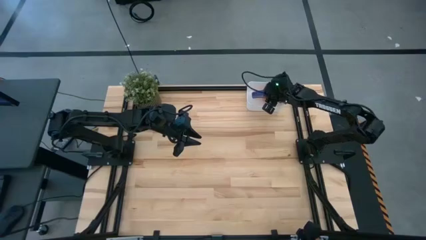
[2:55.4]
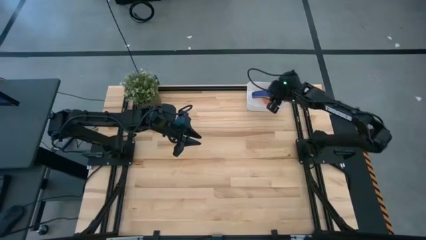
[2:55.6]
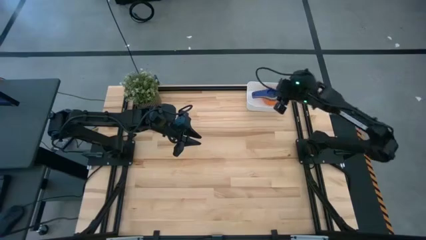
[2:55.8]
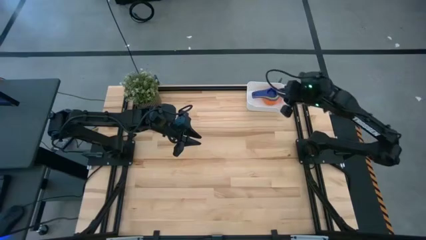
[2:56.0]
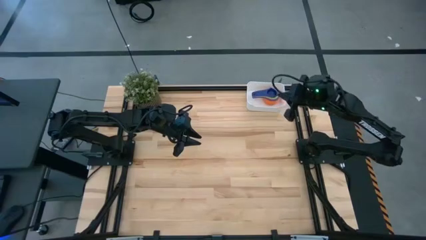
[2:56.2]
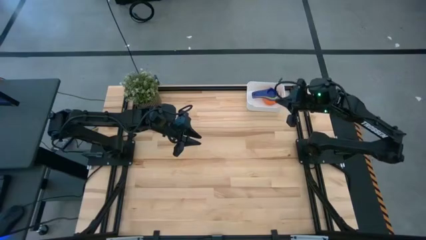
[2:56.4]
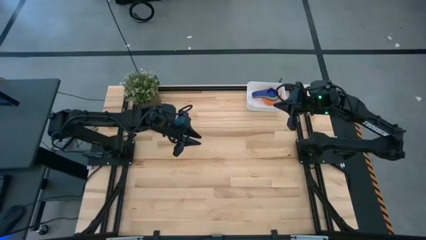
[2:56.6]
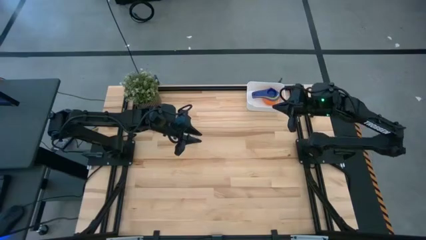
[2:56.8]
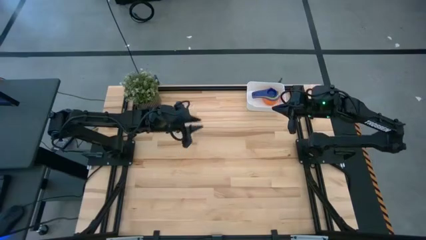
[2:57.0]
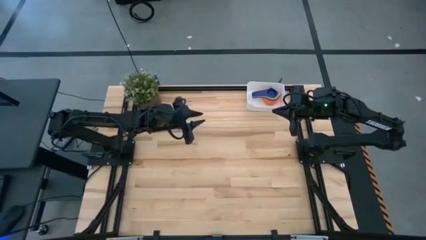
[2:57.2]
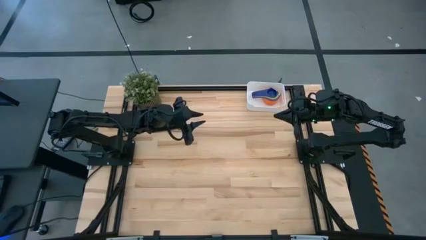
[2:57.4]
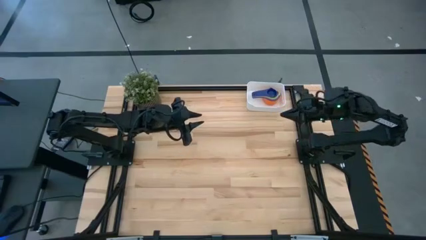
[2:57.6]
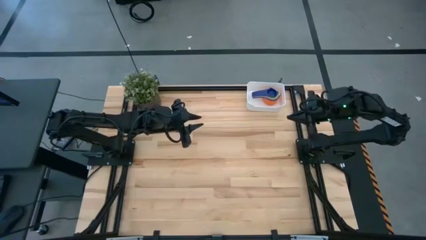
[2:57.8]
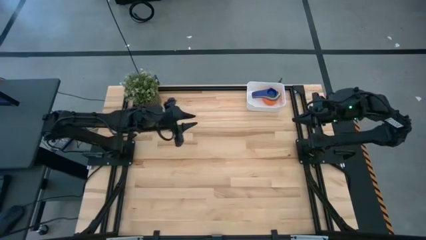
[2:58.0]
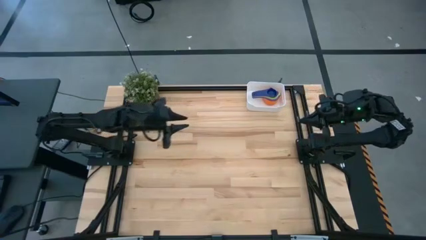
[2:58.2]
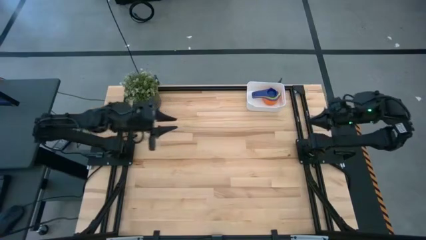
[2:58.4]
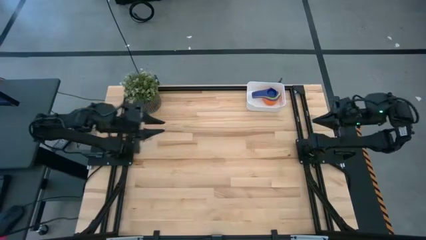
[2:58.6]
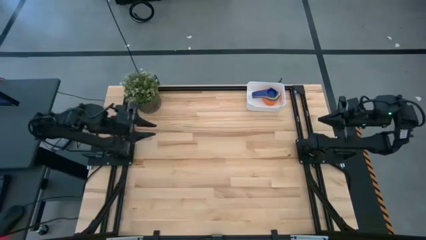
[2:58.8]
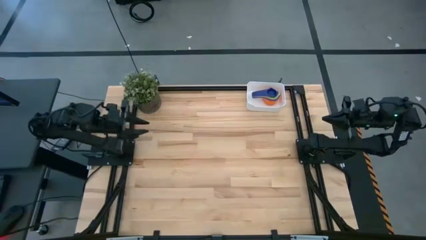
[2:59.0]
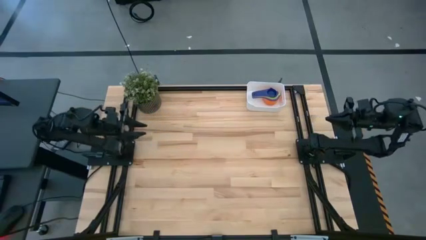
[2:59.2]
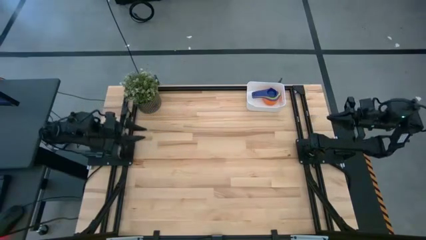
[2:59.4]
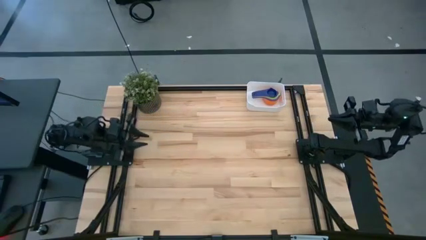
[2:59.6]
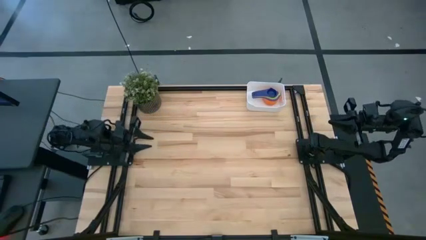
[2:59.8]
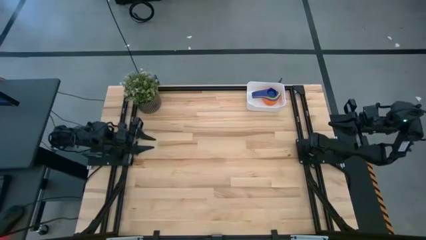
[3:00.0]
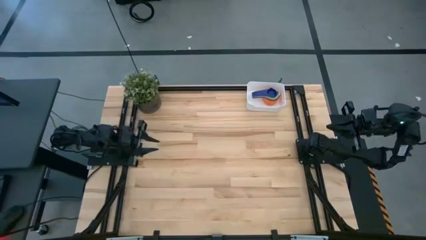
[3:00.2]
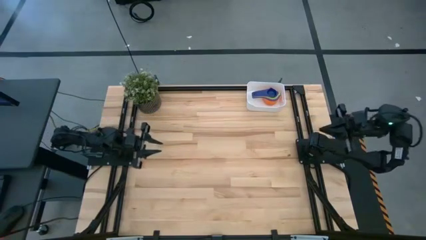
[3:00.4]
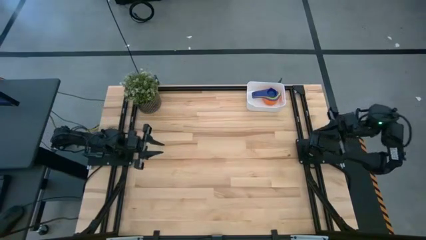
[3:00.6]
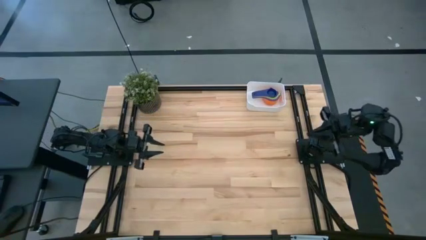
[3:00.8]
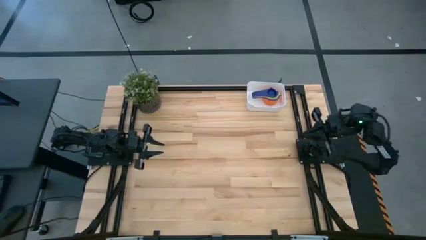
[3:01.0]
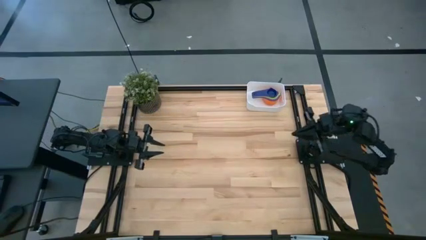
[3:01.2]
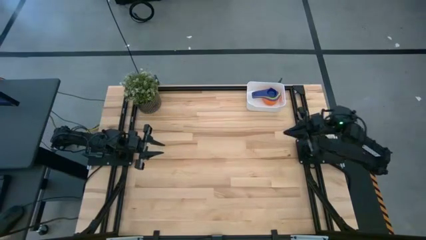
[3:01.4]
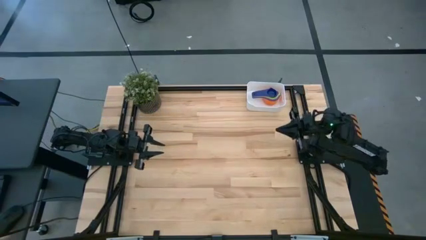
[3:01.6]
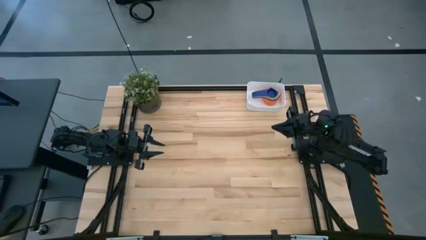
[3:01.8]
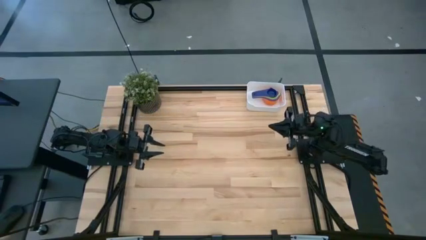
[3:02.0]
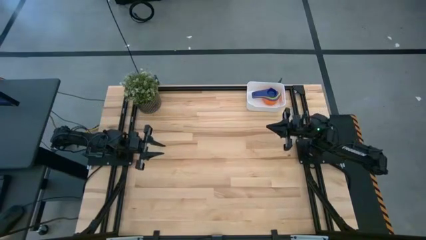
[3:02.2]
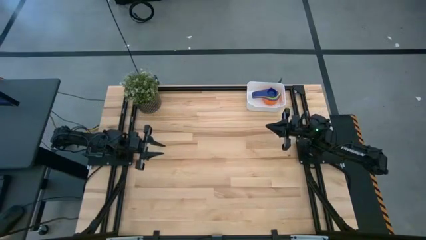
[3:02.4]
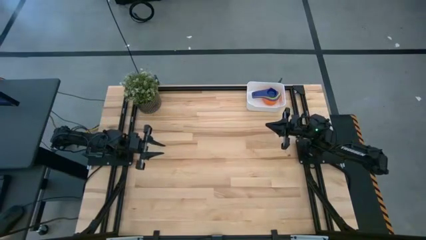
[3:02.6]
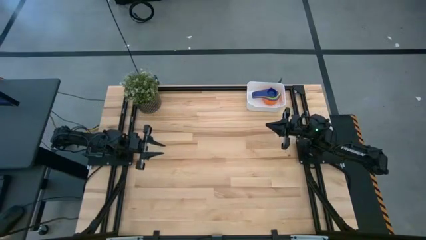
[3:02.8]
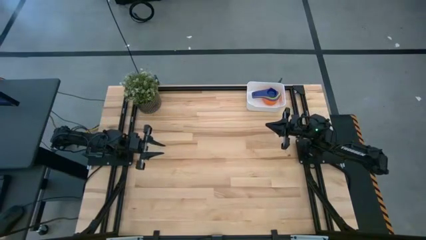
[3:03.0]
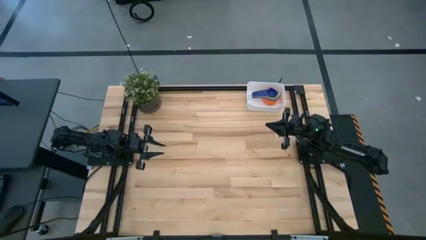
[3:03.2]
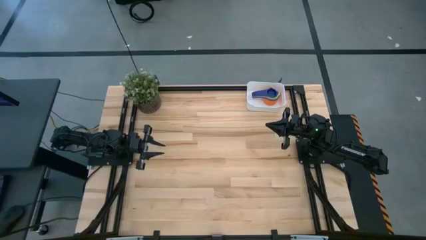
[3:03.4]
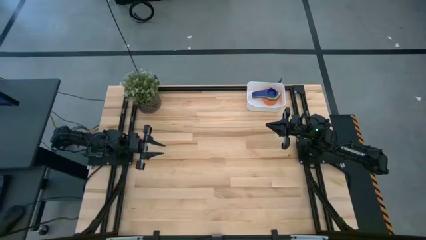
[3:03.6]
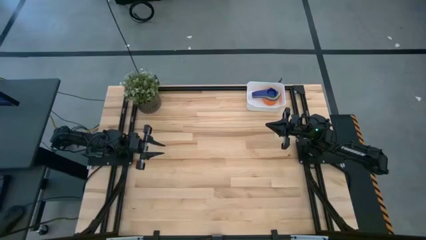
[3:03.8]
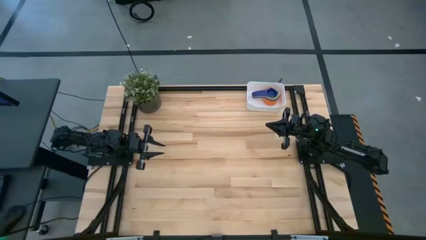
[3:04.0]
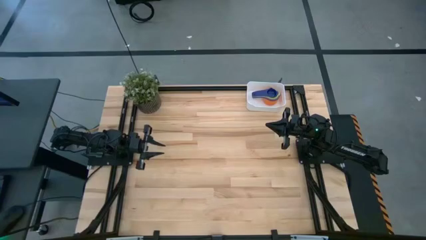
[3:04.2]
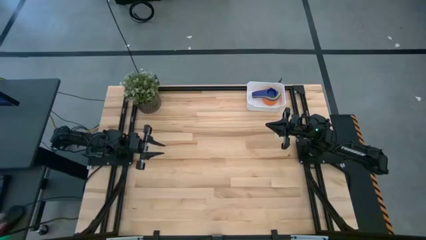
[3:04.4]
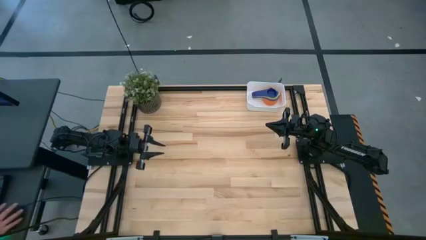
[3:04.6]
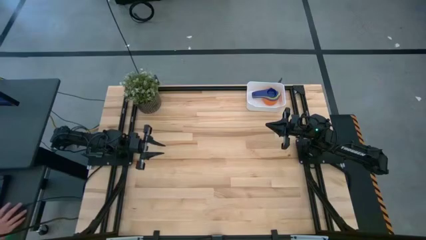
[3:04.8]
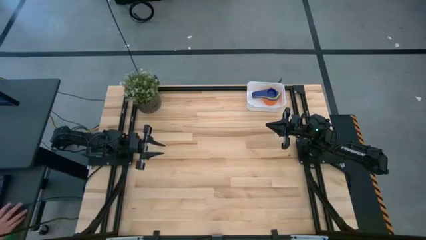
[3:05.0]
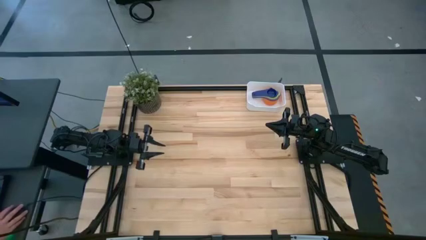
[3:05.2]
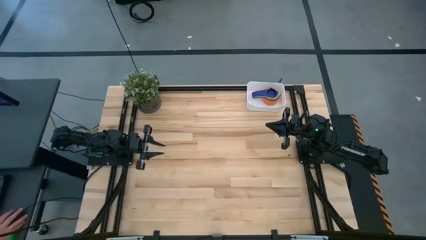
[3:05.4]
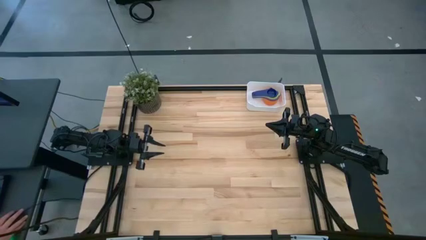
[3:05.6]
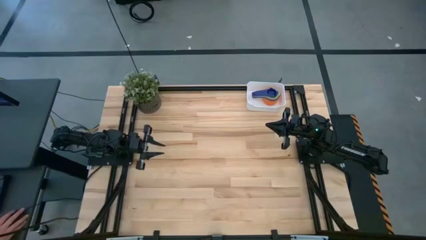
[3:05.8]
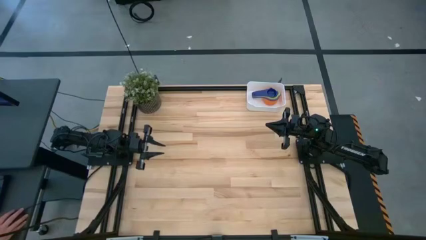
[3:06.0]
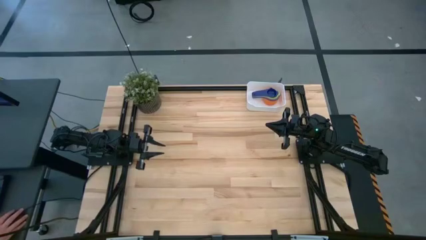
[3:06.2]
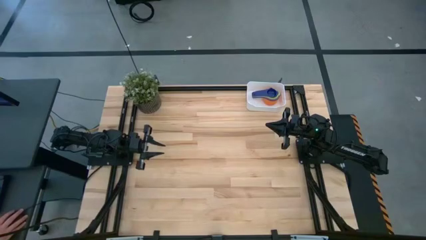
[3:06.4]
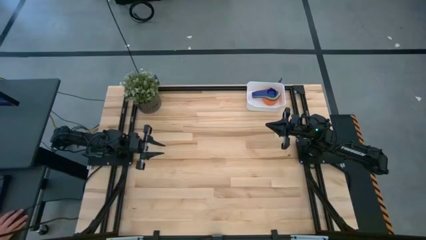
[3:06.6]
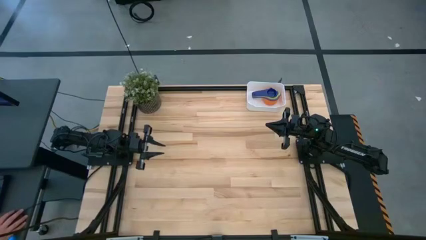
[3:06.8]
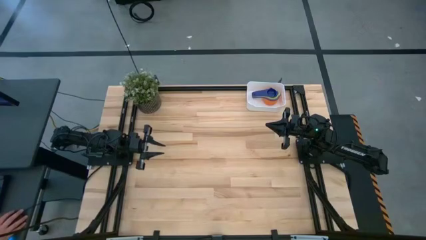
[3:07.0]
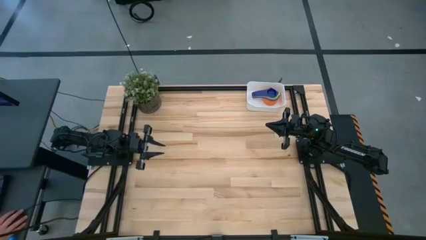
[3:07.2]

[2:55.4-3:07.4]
Task: Nest measuring cups in basket
Return to Home Position

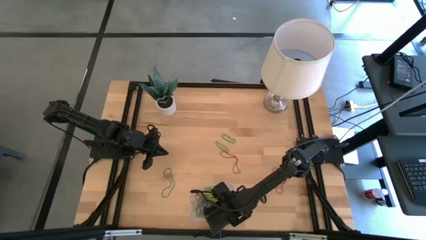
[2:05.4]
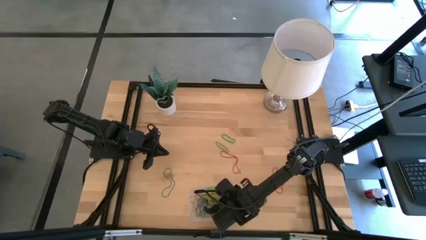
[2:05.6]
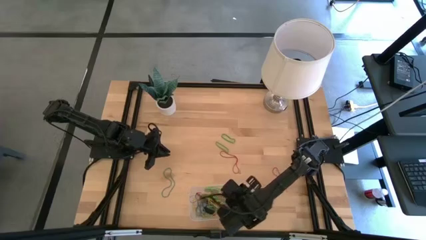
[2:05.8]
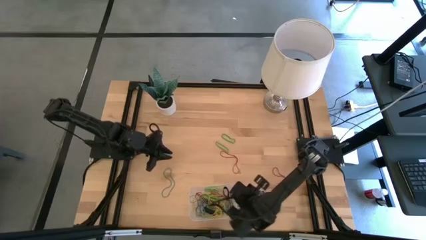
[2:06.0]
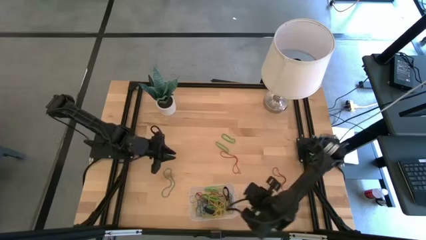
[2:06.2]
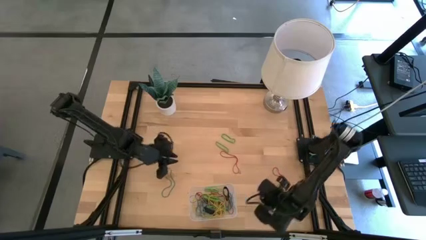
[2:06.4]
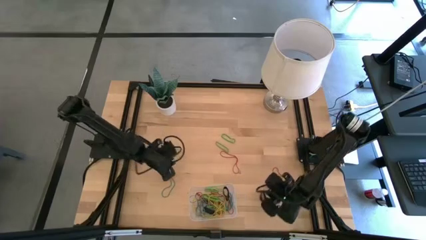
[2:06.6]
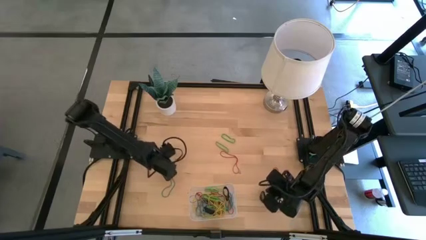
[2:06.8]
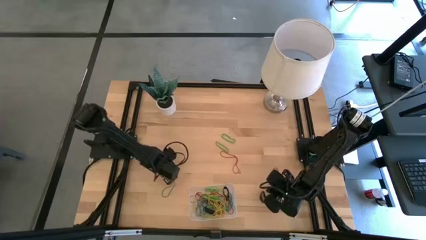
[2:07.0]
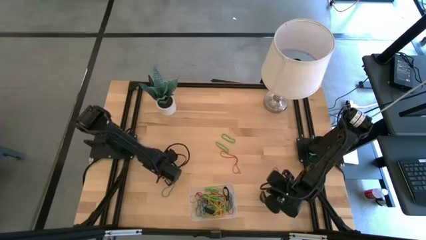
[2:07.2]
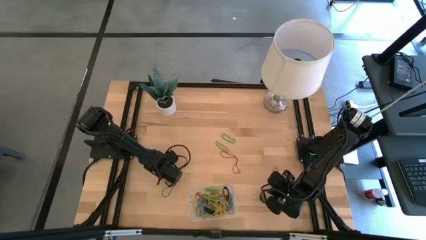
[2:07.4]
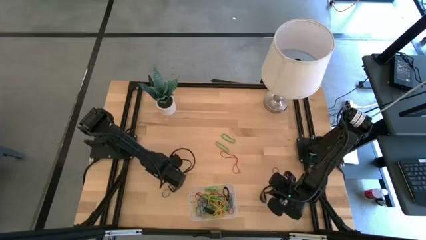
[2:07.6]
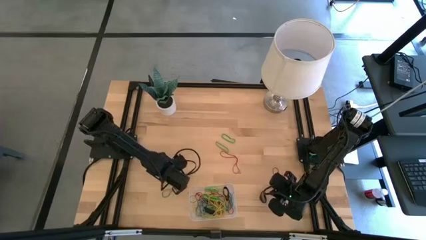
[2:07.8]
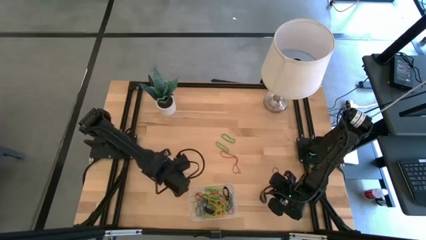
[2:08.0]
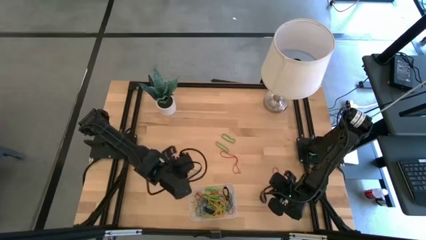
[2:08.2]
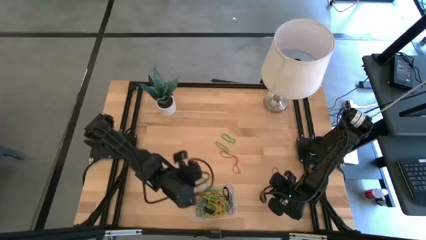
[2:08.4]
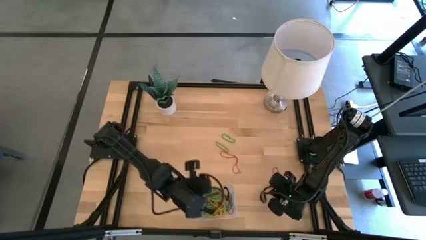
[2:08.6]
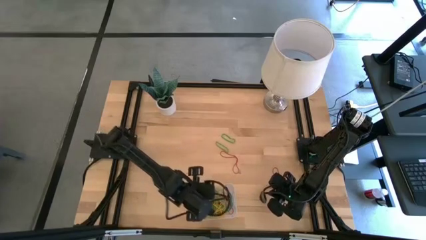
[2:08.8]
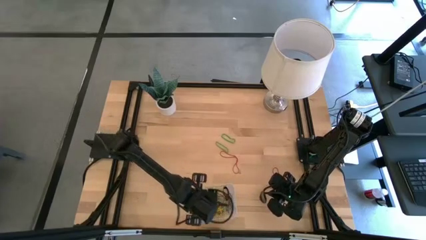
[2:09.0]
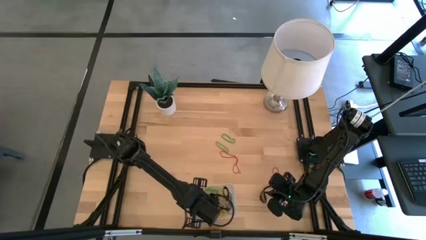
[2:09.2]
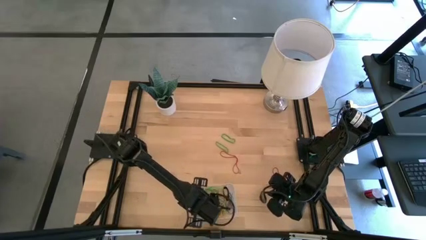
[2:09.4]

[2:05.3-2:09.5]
Task: Pick and place rubber bands into bin
Put the blue rubber band into the transparent bin
